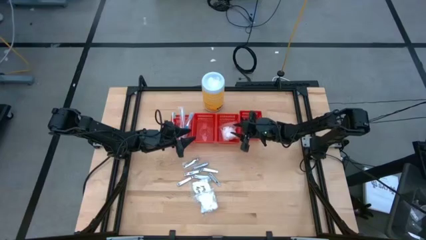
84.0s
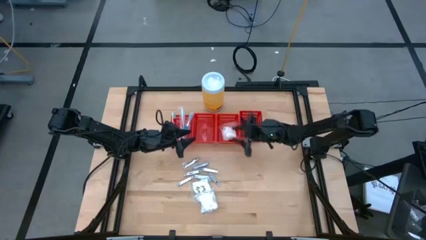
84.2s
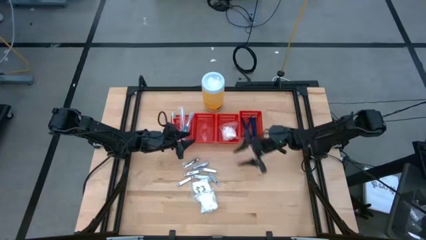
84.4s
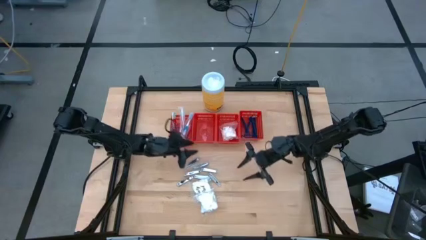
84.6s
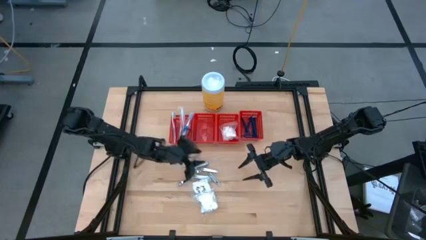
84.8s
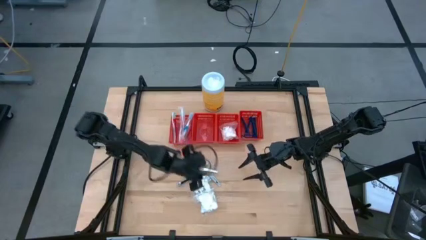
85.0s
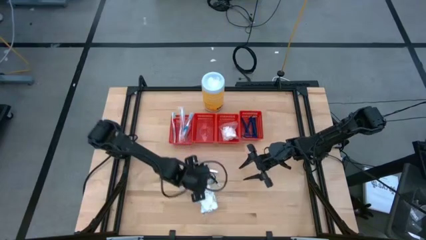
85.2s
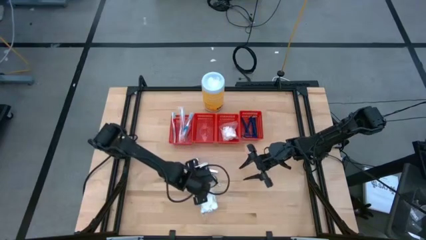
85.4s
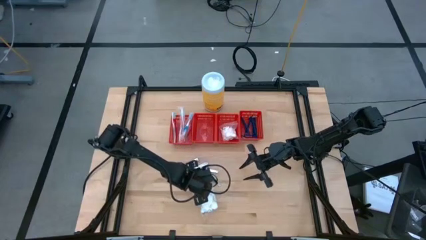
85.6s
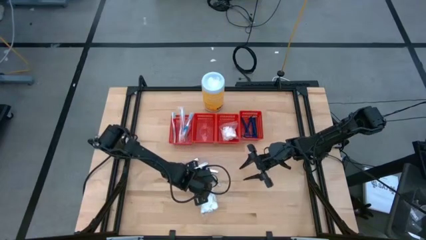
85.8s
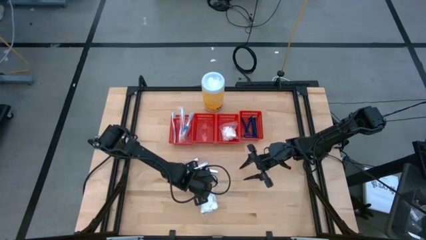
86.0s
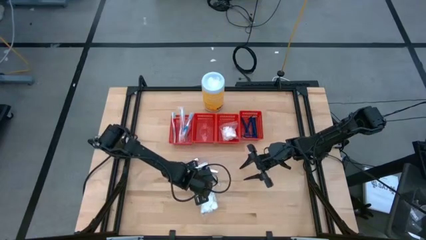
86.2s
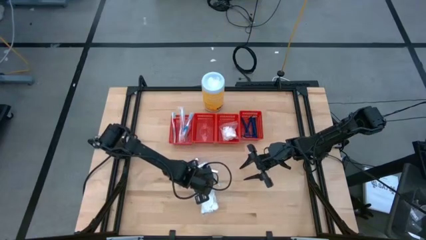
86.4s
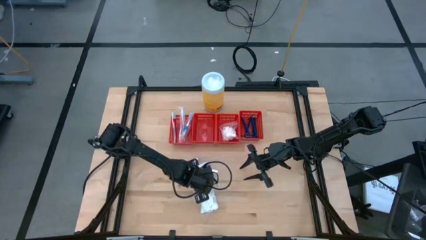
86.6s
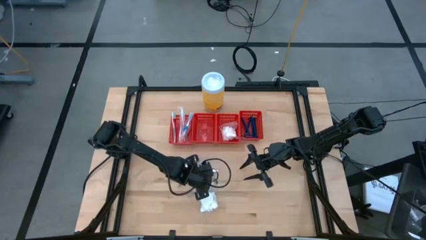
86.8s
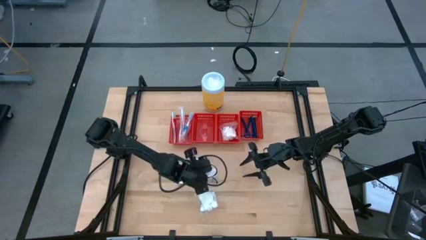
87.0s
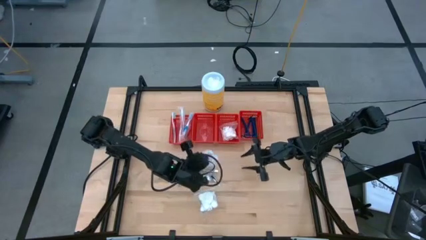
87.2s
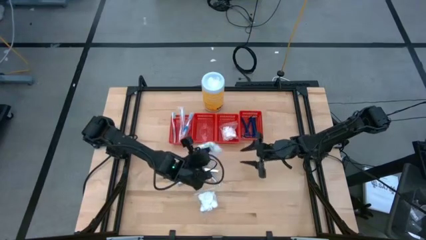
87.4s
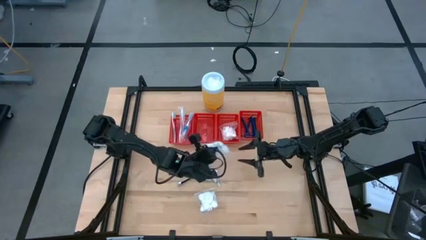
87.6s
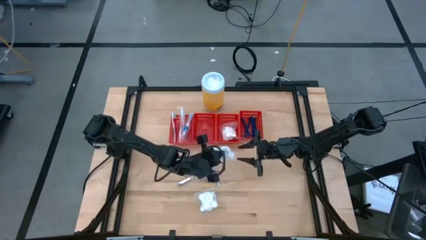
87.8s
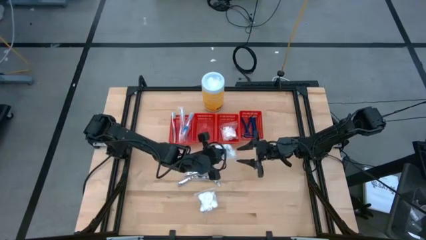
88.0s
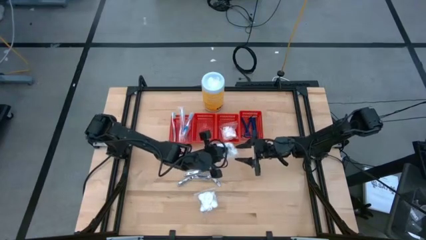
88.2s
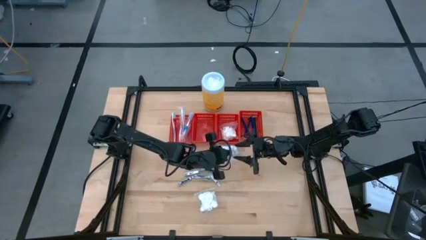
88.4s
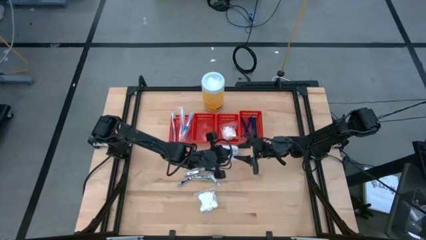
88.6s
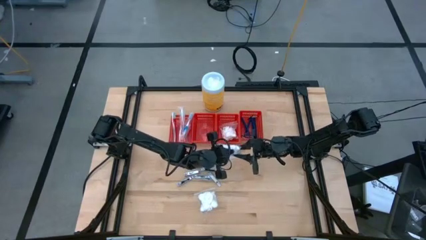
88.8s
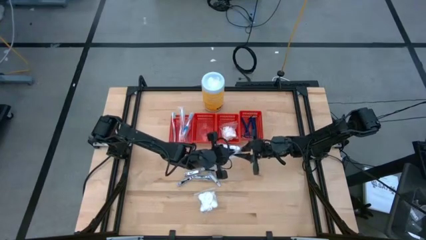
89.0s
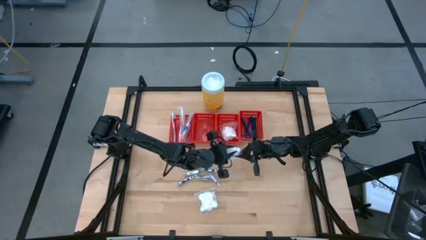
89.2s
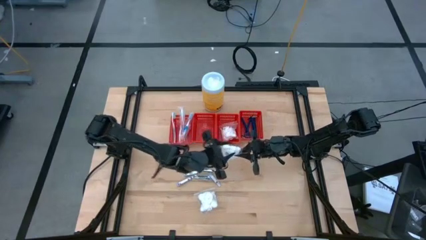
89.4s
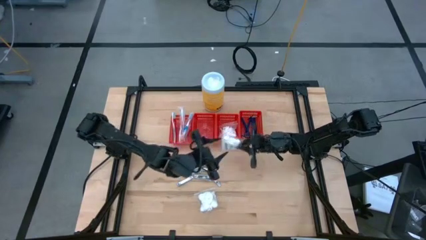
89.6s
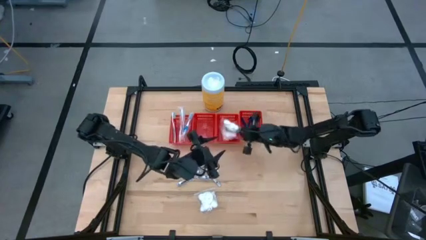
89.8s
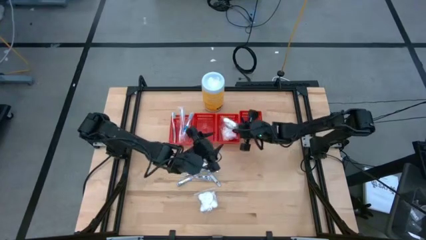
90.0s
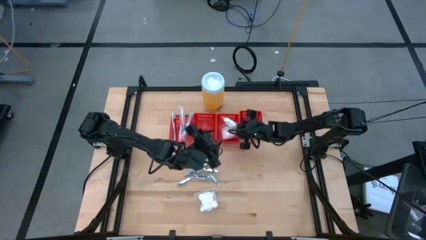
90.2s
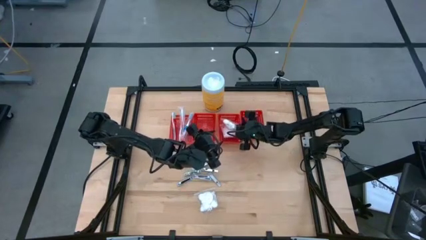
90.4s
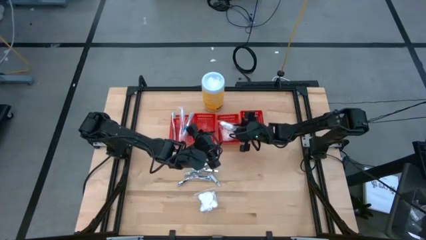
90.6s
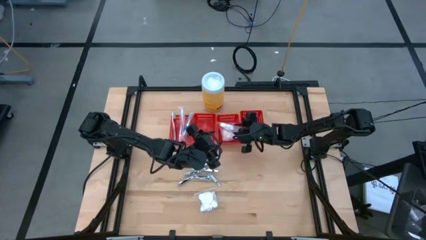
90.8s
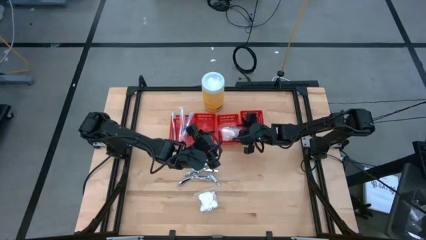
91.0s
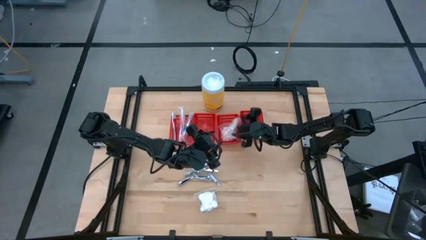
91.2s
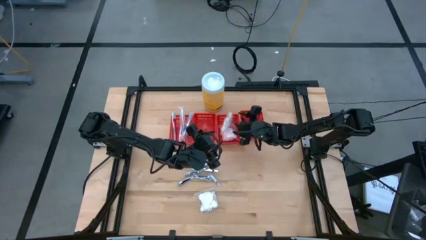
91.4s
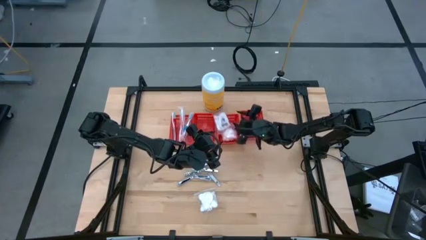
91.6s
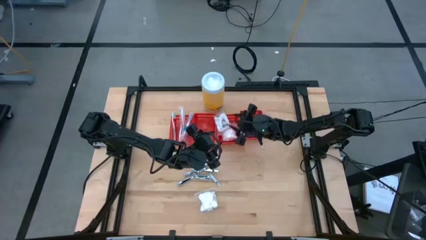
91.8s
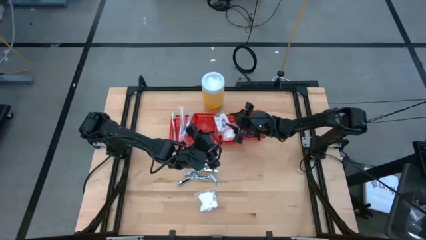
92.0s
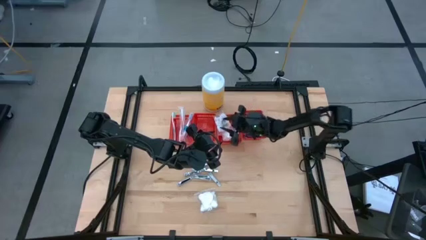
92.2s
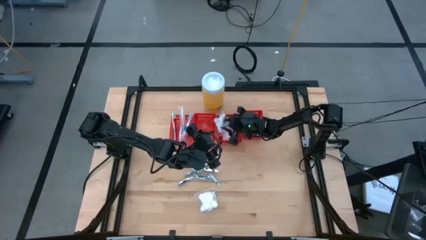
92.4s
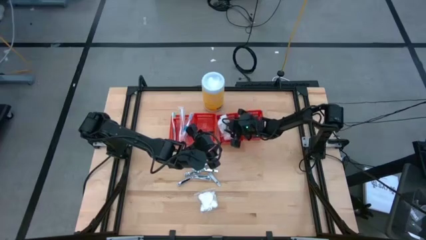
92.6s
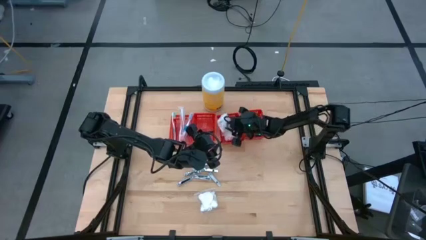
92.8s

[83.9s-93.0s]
Task: Pick & Place Travel size toiletries
Put the cotton pack into the middle right red basket

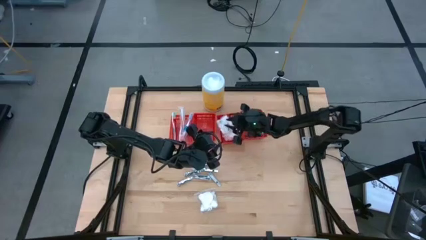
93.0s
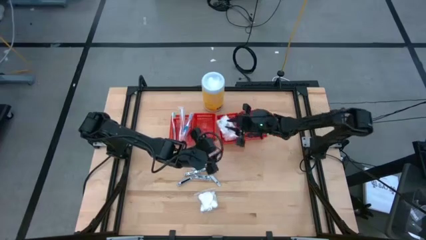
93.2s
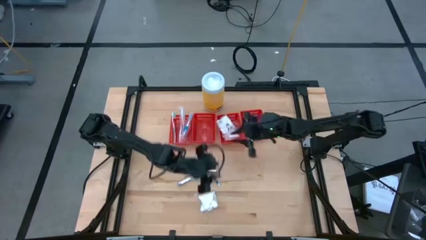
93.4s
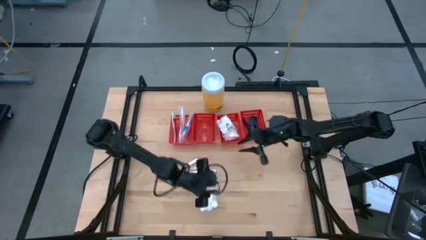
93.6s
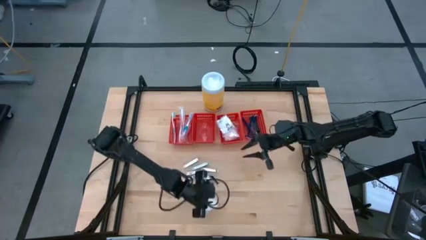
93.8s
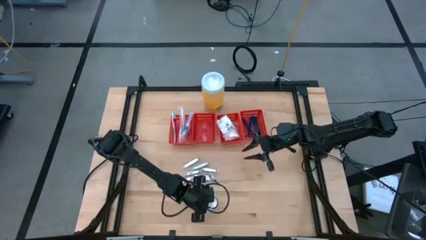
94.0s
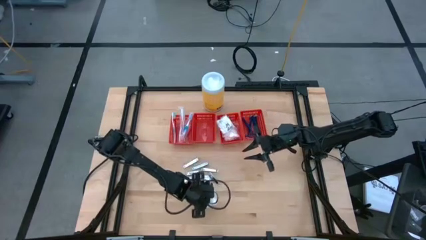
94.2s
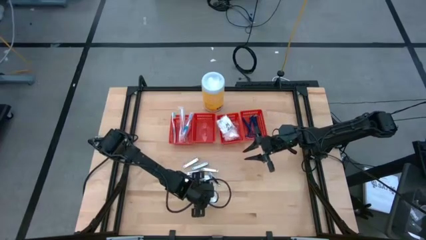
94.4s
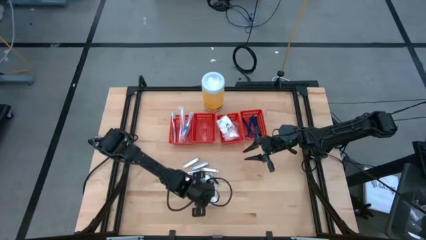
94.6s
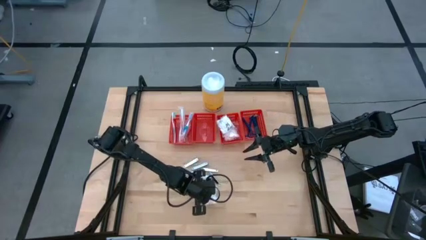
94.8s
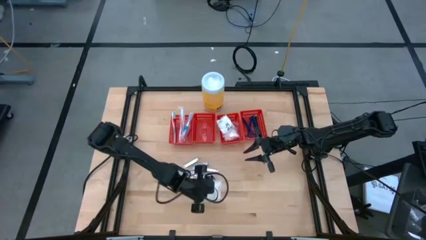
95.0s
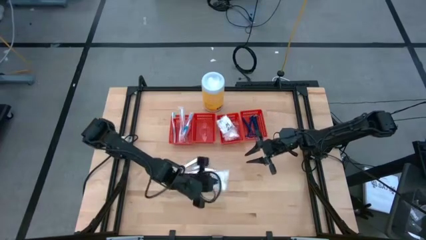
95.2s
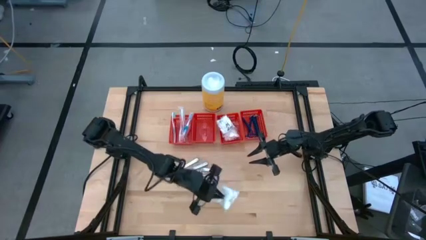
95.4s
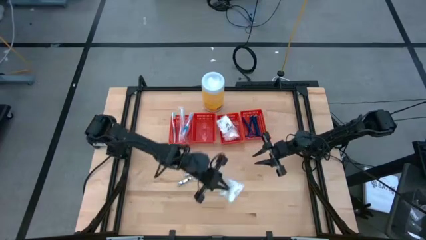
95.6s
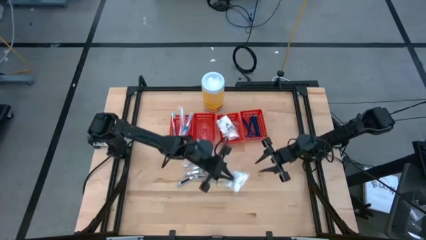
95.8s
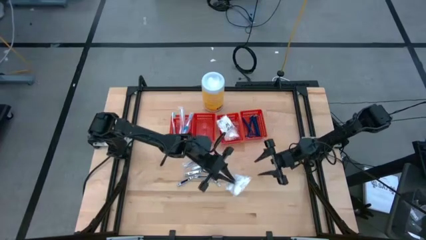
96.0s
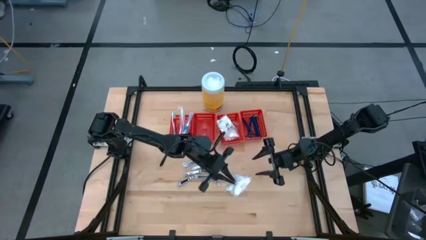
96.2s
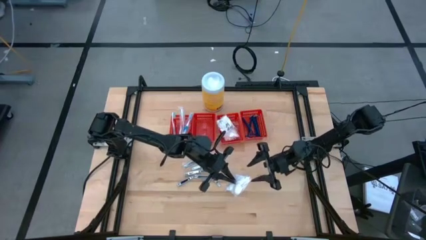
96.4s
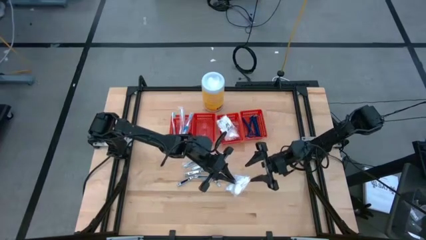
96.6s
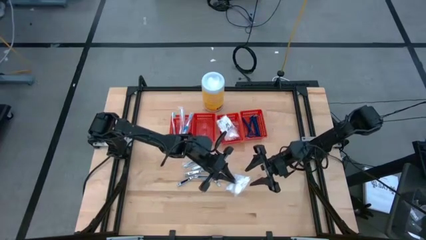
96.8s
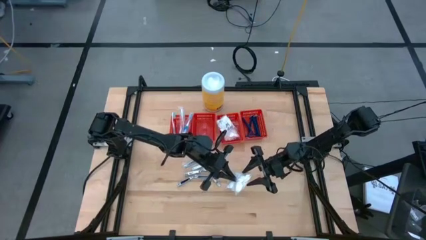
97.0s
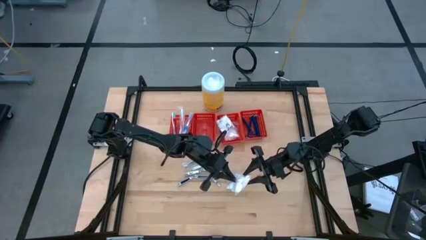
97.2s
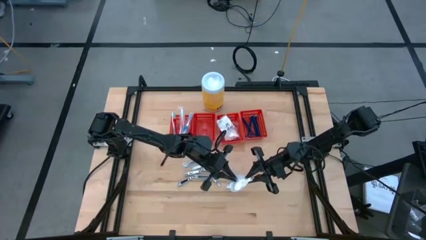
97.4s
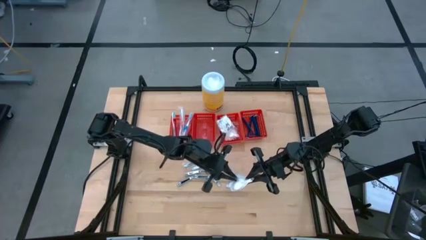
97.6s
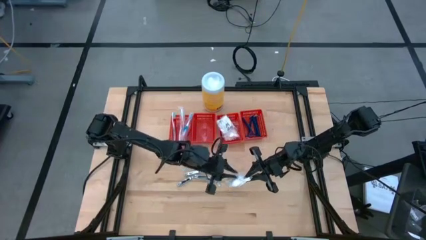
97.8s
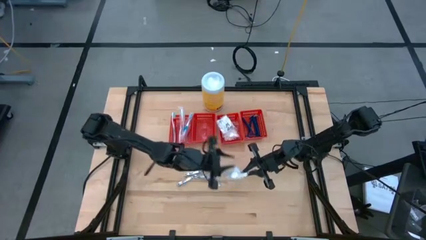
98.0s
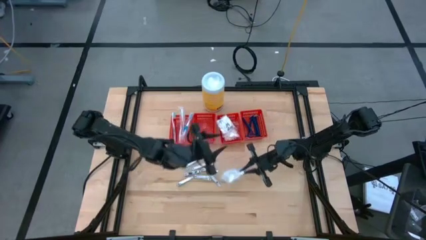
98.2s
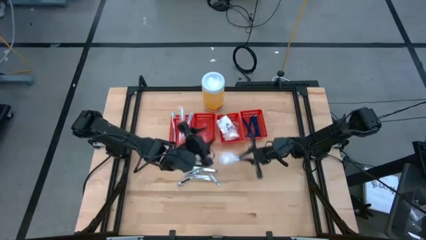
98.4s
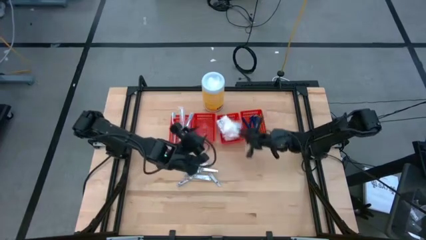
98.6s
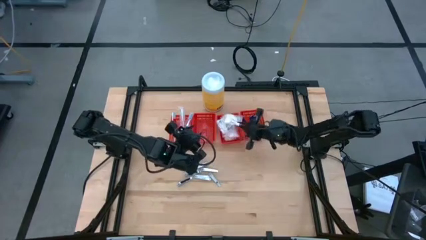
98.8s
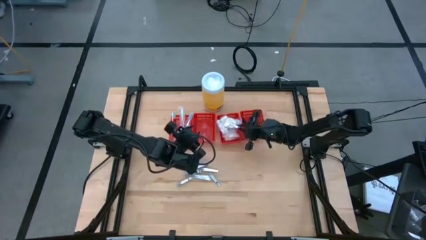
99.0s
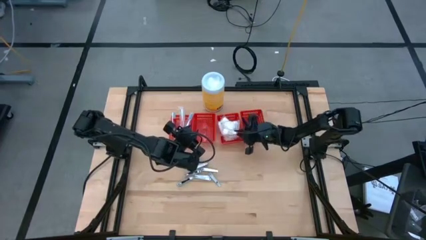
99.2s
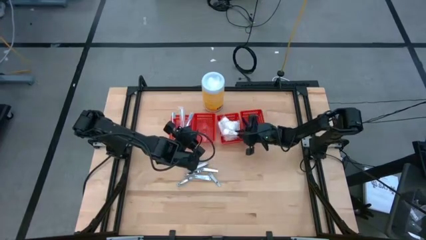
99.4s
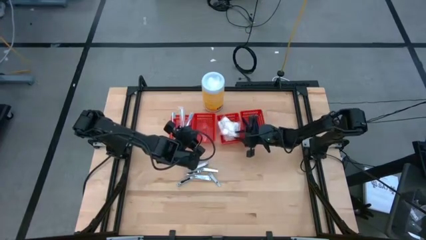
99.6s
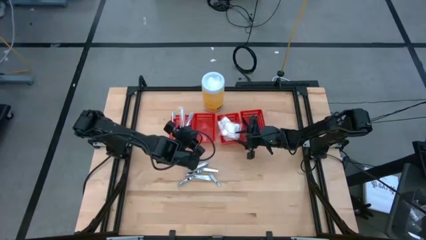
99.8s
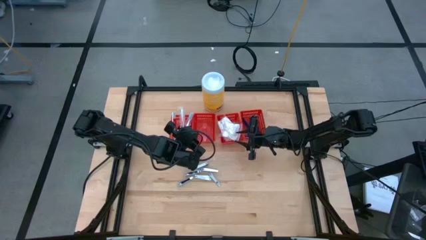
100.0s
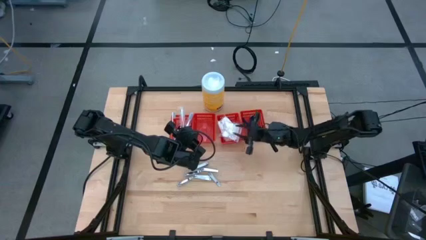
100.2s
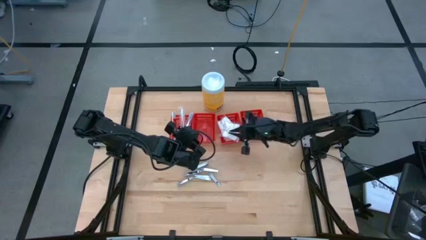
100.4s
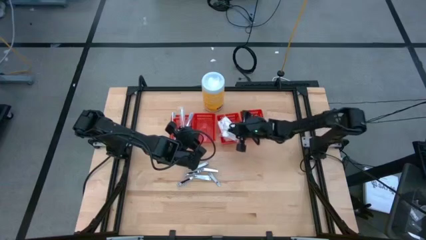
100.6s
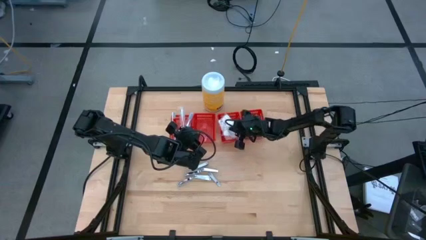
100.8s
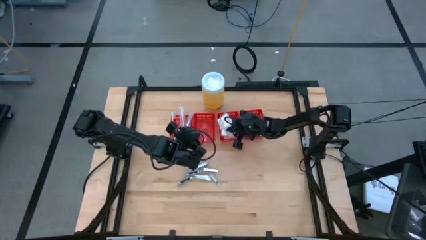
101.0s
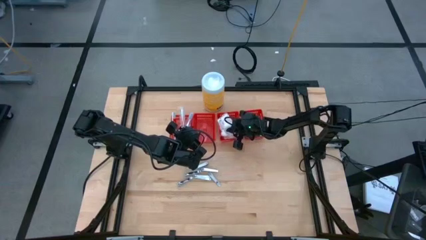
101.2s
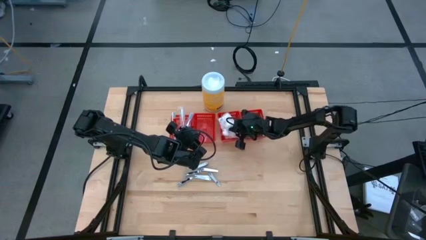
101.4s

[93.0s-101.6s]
Put the cotton pack into the middle right red basket
